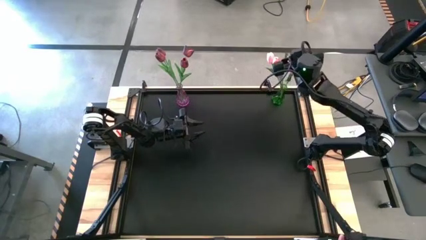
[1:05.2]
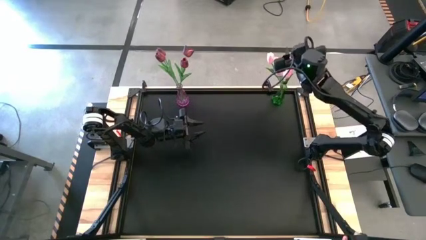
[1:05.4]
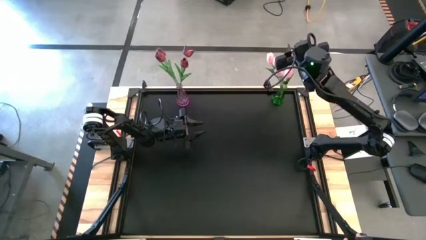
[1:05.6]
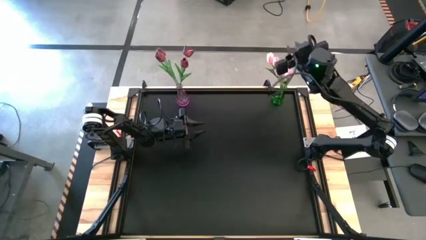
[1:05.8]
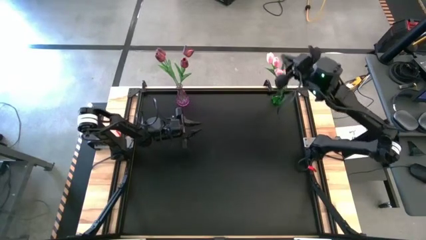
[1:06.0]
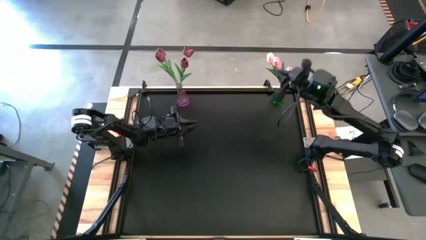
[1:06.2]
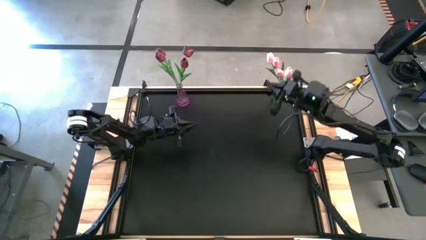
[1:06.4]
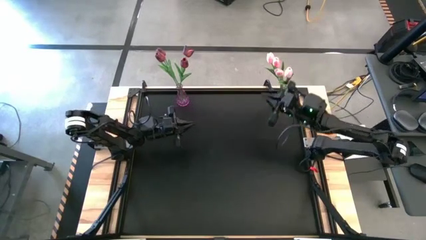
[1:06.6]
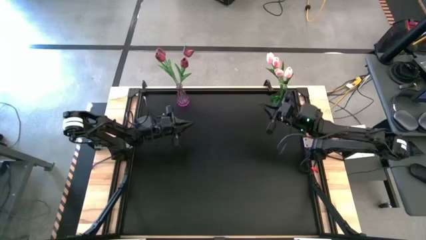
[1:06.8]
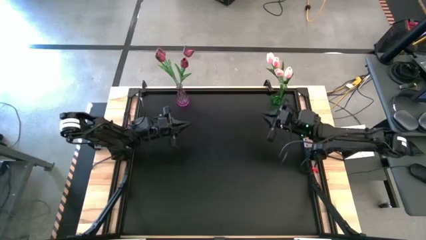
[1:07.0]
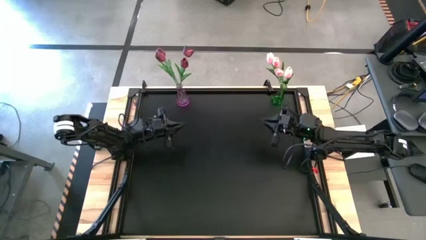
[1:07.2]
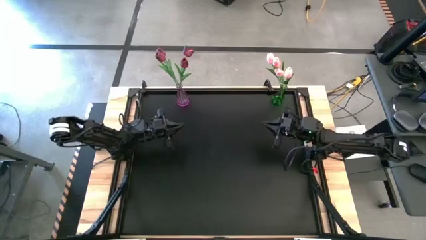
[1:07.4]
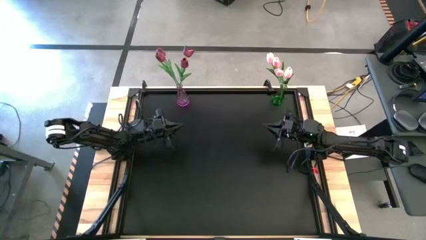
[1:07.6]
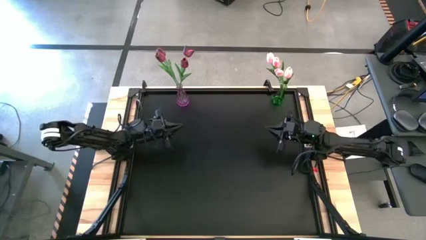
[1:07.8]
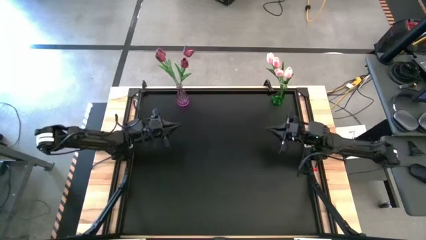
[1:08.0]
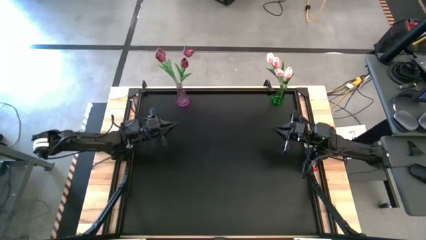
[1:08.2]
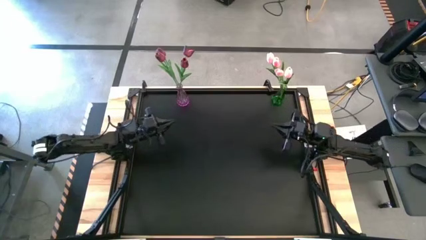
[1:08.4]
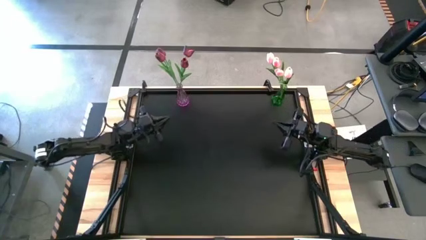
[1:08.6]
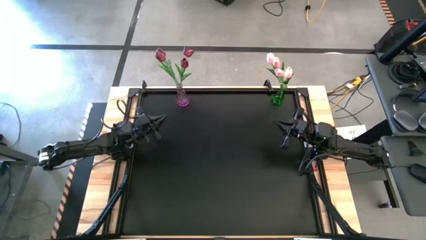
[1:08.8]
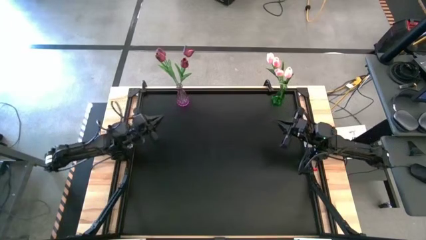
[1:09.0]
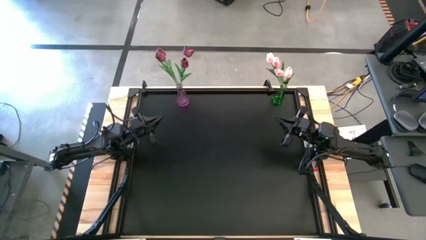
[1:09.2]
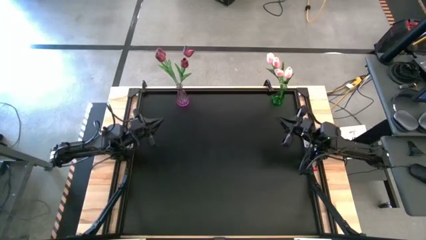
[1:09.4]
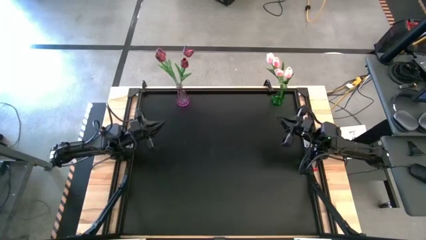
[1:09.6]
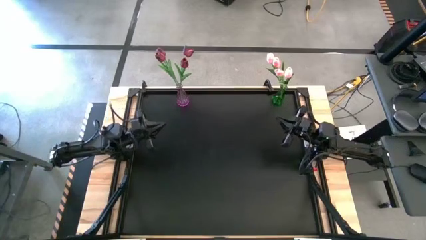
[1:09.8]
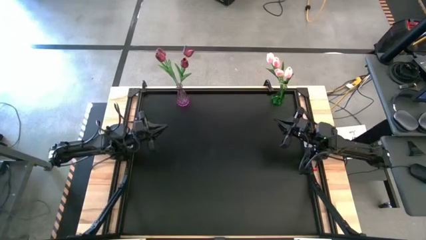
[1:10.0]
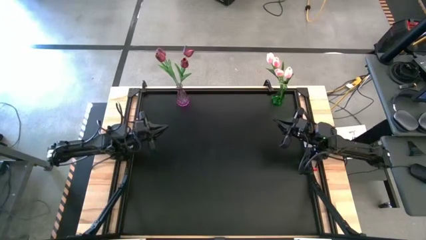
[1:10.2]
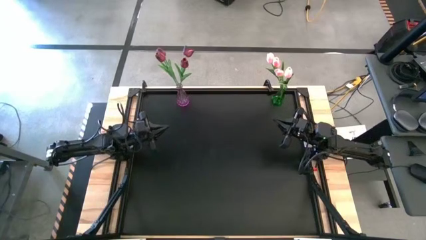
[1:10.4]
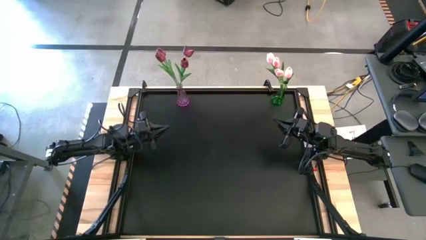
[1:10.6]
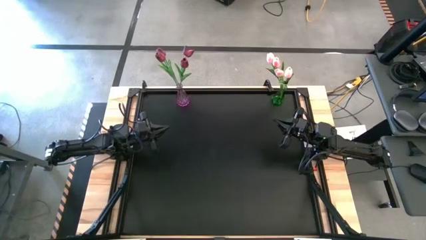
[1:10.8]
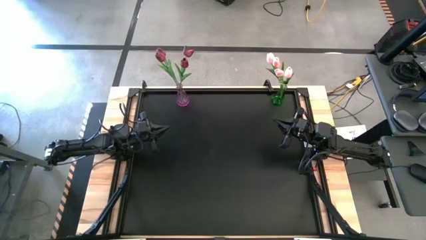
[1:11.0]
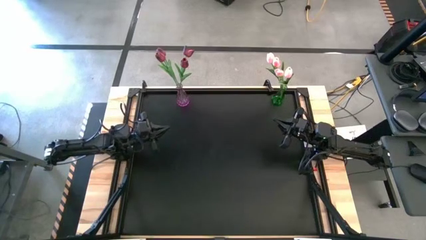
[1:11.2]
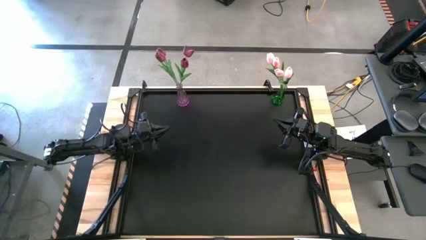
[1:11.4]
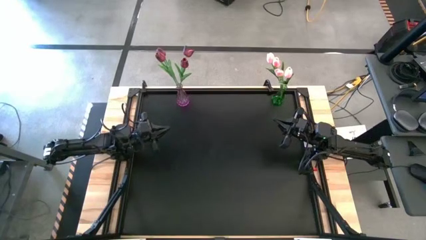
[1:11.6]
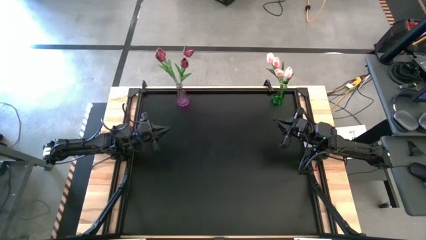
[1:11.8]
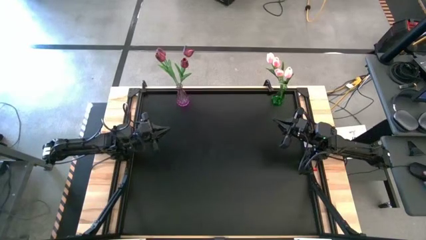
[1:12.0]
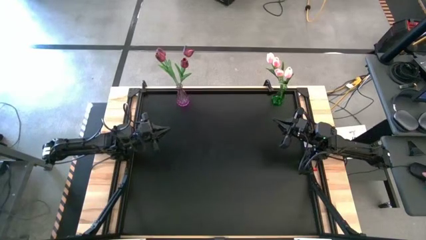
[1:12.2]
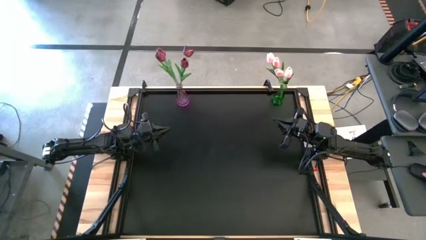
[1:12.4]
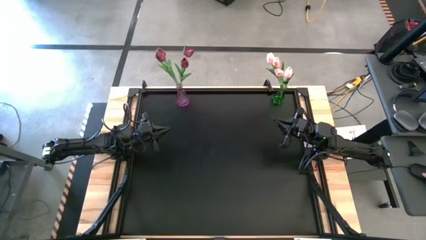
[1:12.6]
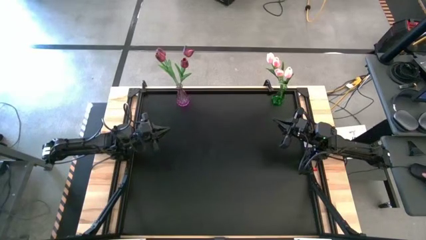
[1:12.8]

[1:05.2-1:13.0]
Task: Sort flowers into vase by color
Return to Home Position

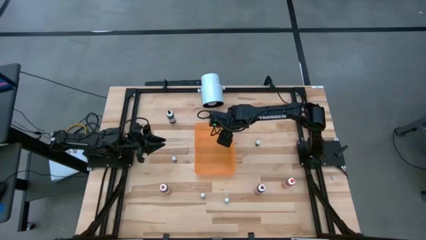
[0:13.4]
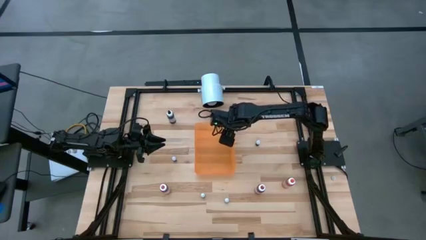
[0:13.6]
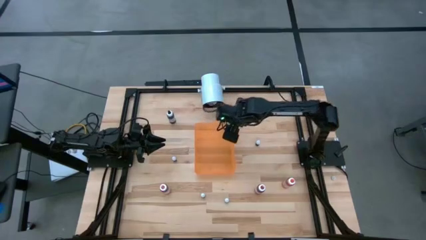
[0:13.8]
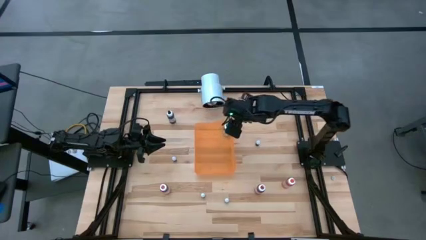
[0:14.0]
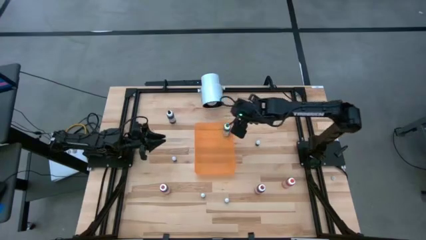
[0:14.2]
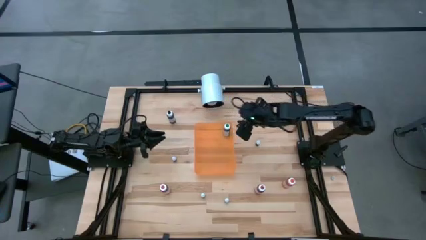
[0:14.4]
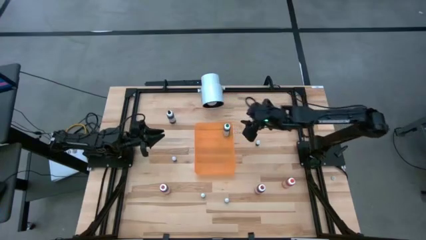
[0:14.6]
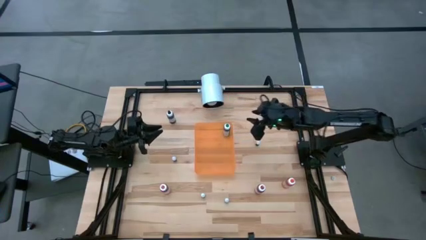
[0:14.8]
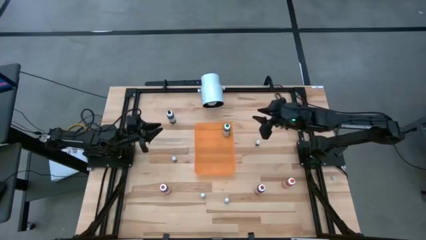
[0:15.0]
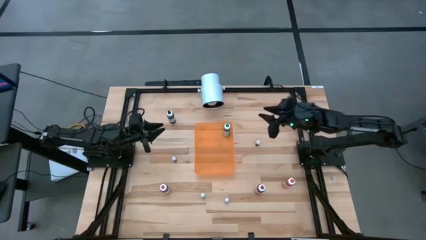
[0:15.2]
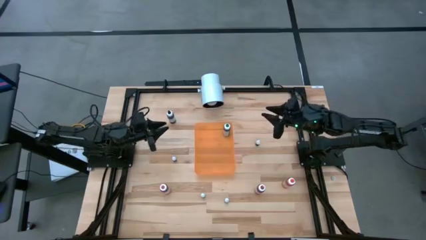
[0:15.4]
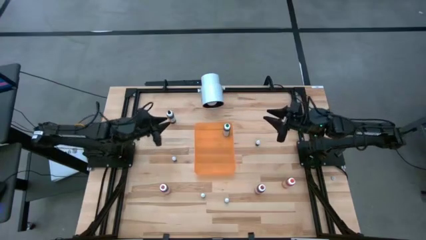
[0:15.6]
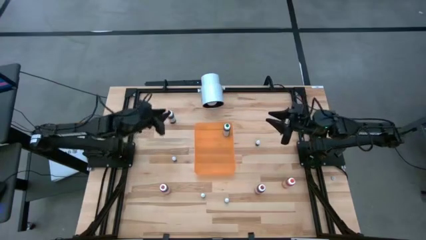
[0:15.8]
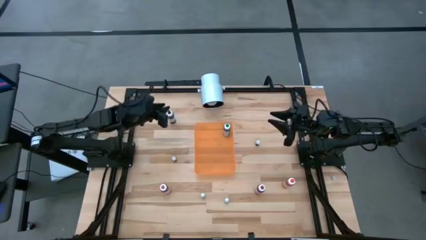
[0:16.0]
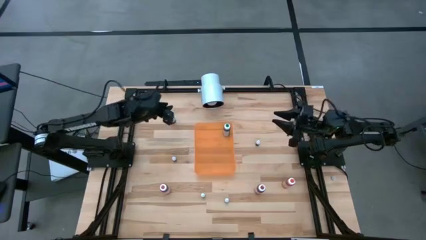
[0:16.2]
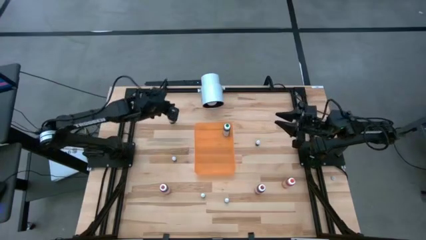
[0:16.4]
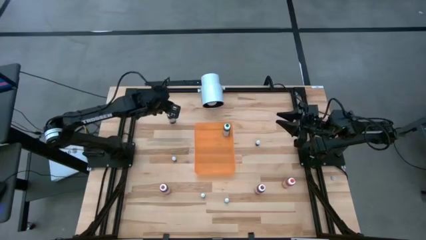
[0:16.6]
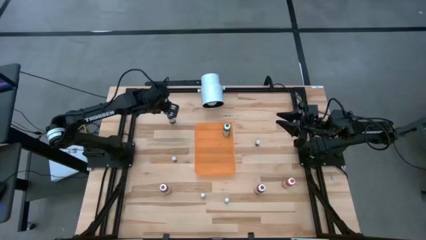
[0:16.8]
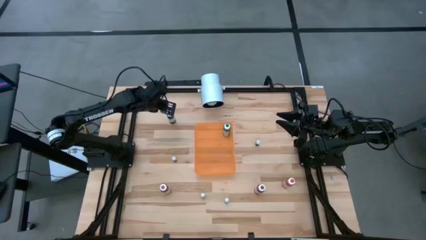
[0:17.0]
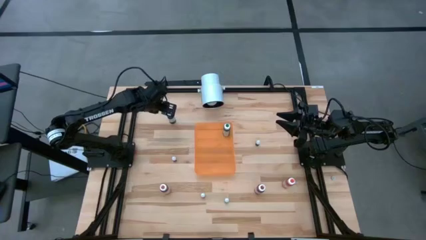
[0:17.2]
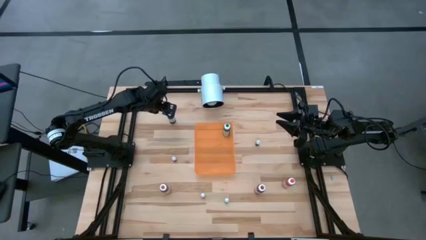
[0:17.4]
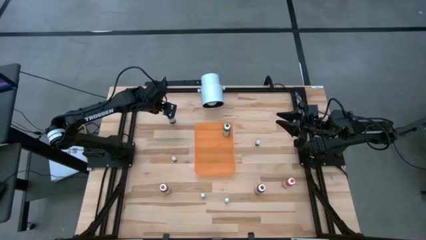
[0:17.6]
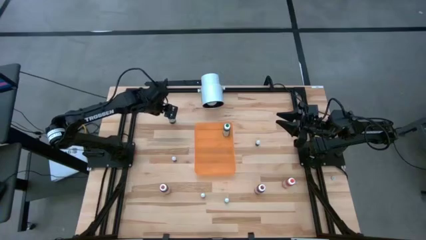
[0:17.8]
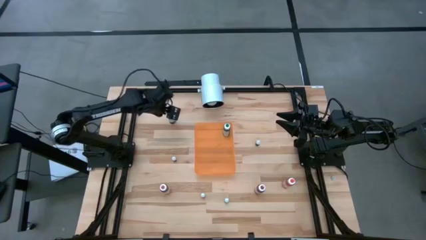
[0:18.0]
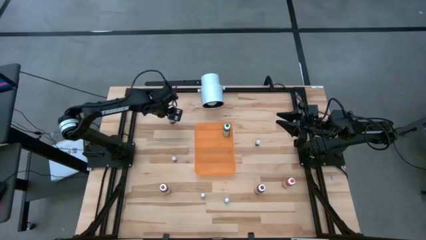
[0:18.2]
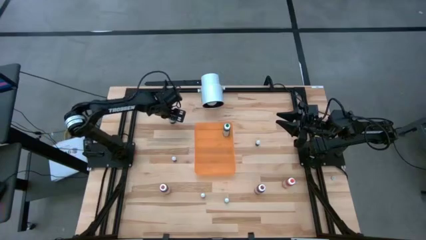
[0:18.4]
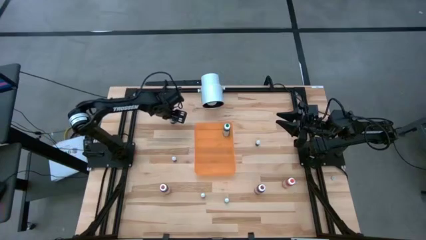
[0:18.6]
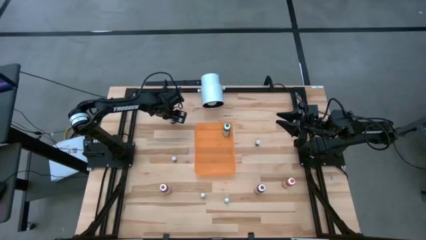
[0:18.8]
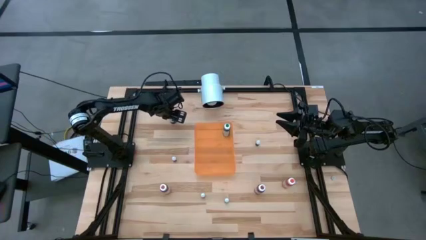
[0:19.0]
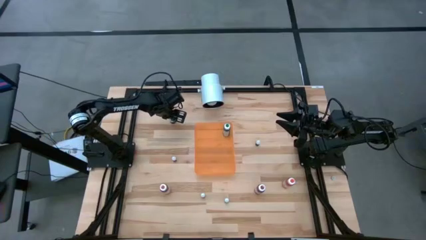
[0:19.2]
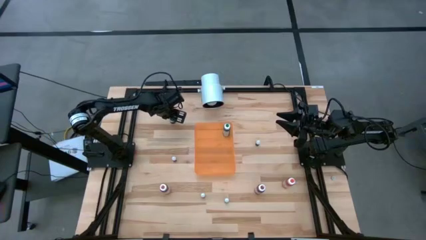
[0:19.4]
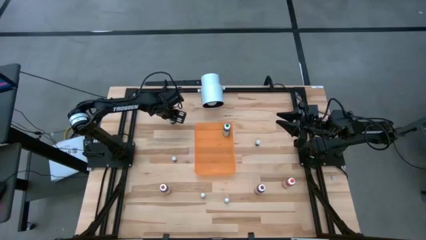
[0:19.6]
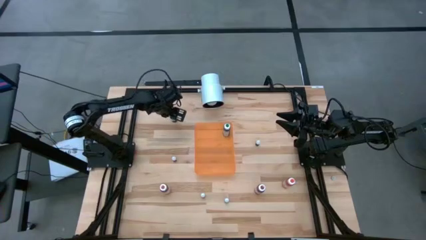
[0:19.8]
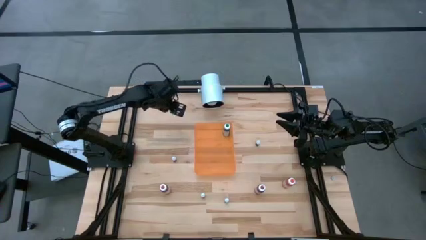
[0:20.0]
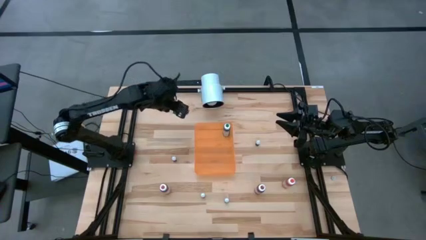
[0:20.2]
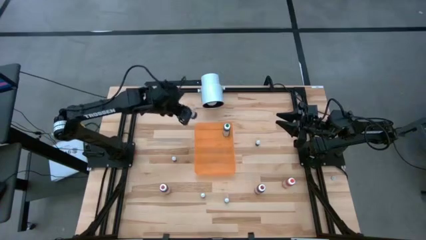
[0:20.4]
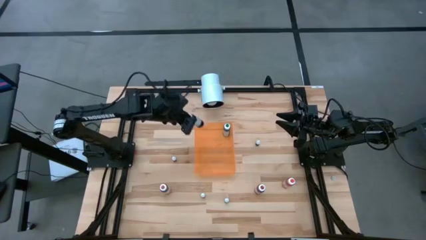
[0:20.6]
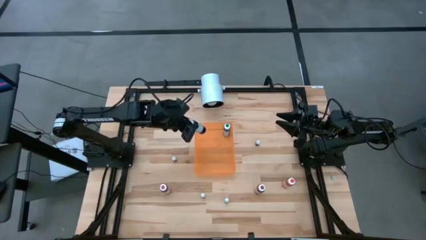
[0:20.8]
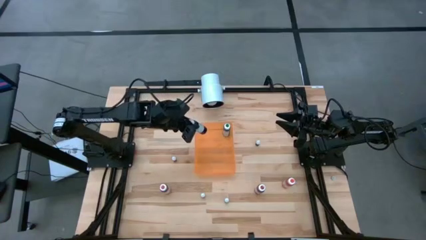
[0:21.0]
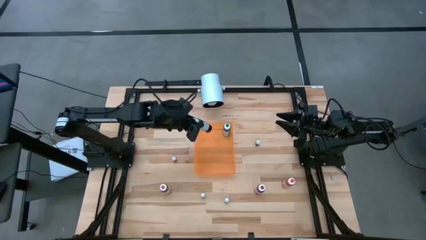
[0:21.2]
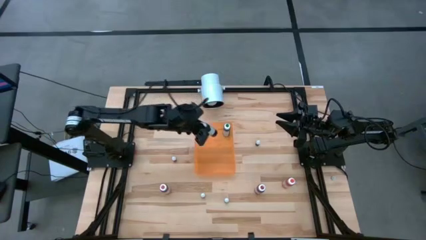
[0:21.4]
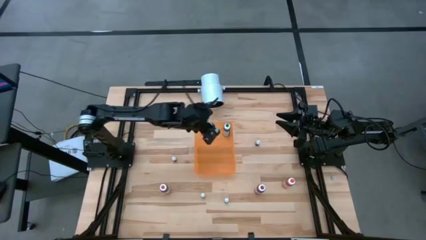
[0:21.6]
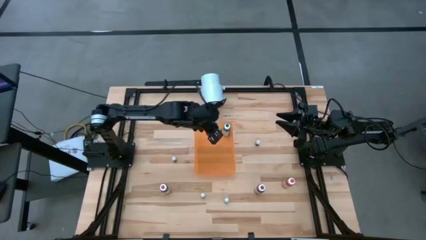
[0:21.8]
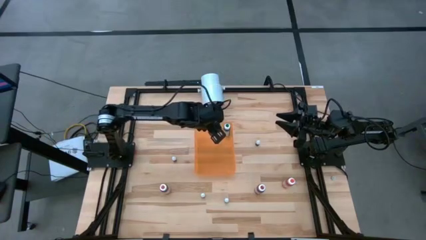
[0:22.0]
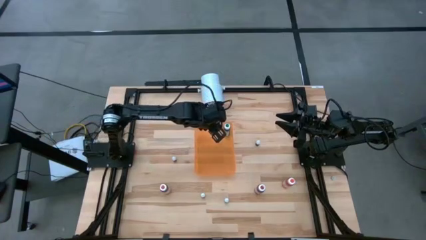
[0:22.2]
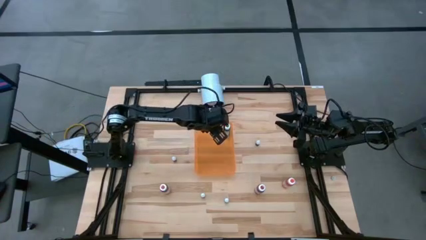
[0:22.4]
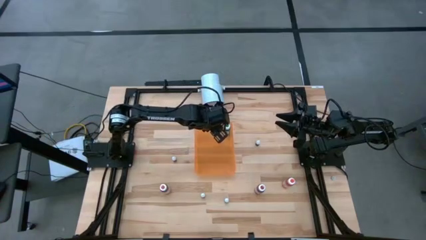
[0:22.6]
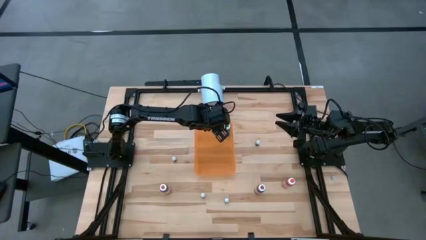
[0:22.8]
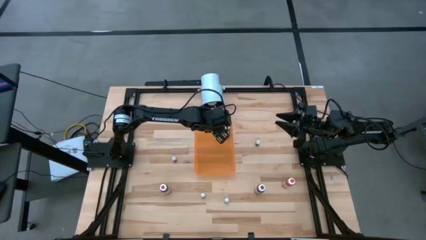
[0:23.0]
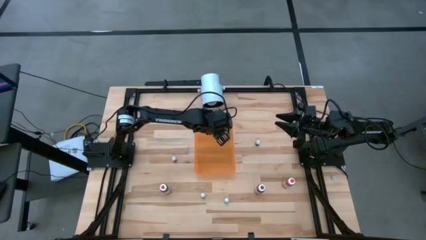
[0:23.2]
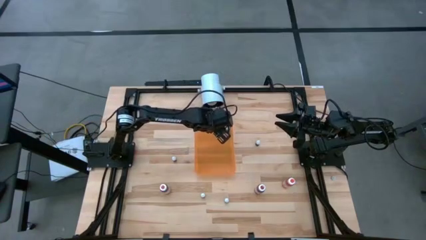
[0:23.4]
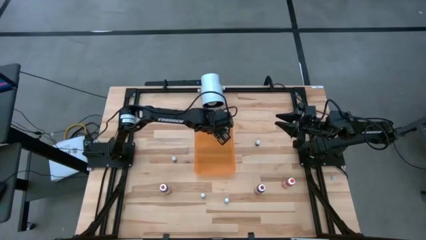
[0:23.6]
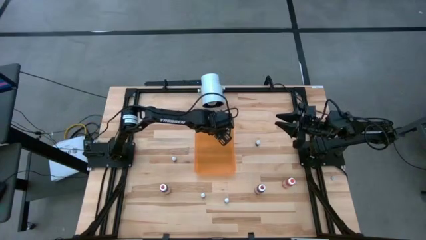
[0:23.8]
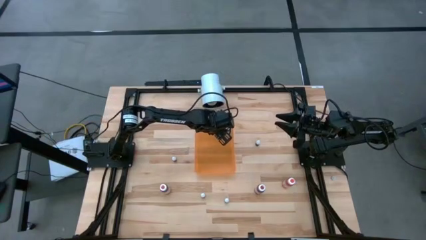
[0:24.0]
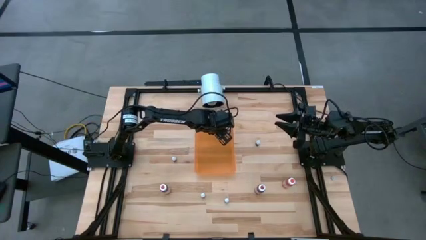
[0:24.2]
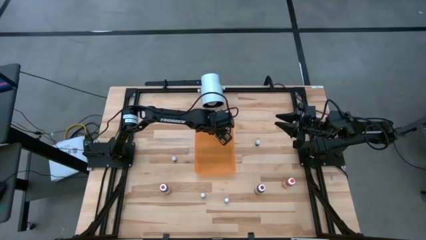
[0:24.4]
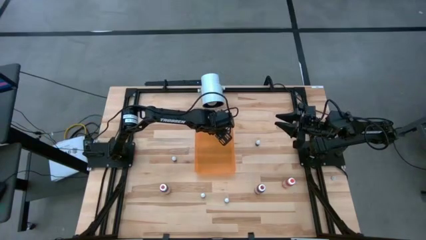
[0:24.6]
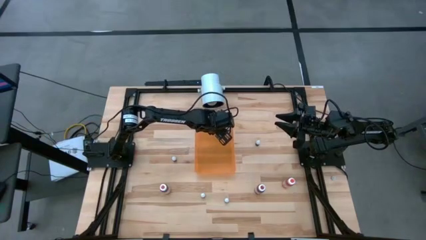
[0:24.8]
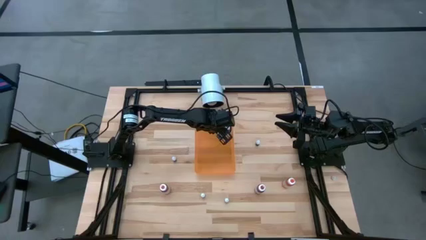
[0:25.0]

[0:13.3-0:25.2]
Task: Pick & Place food coloring
Put the large black food coloring bottle into the bin
